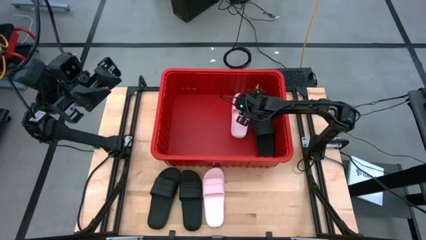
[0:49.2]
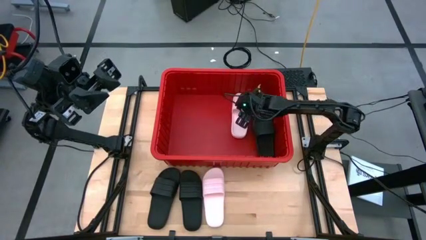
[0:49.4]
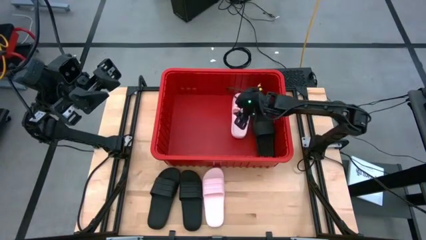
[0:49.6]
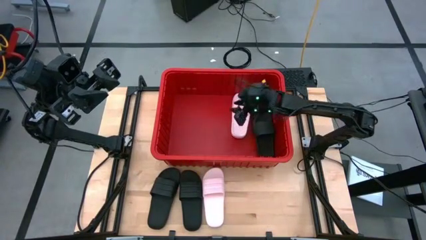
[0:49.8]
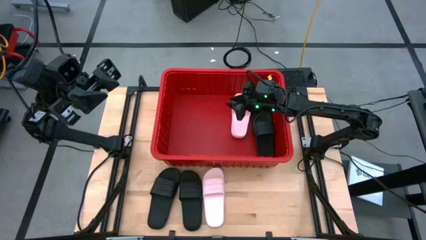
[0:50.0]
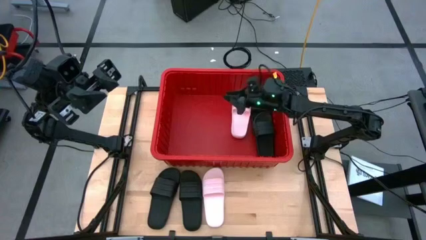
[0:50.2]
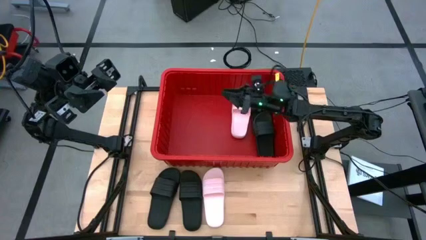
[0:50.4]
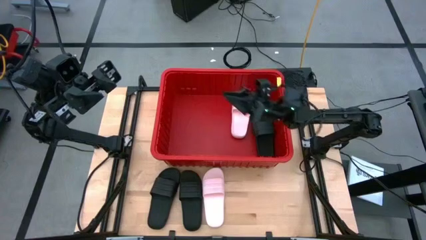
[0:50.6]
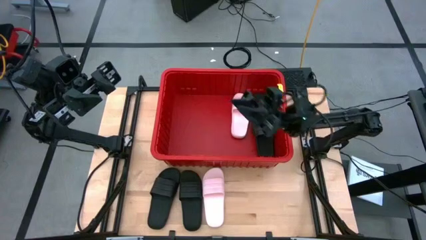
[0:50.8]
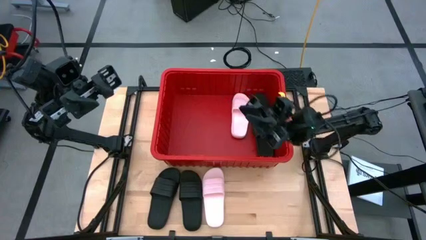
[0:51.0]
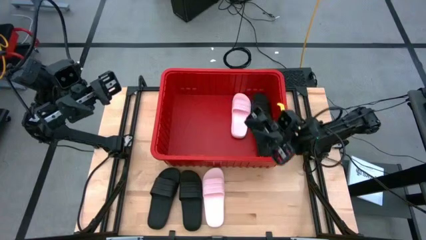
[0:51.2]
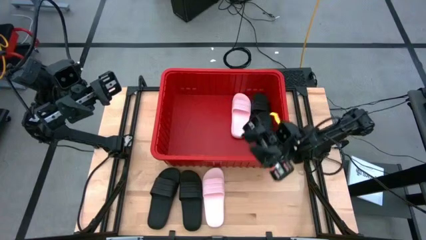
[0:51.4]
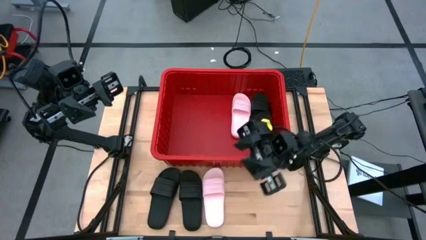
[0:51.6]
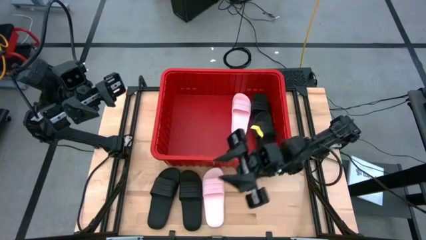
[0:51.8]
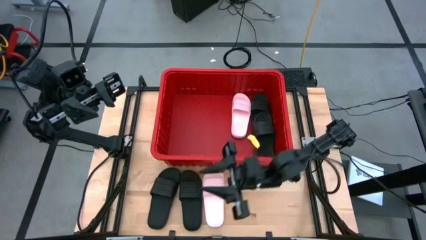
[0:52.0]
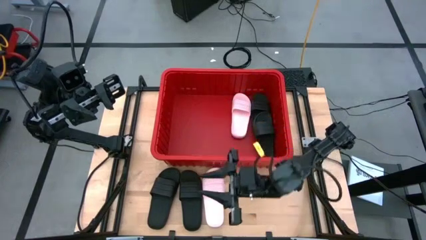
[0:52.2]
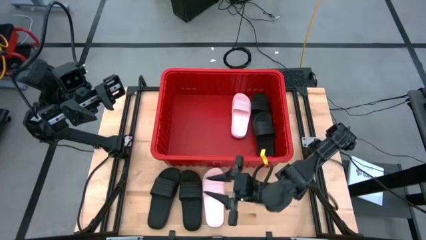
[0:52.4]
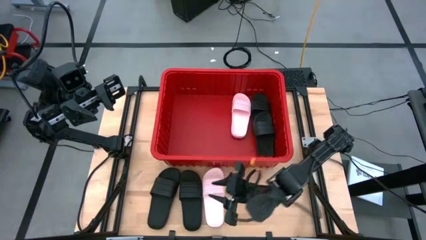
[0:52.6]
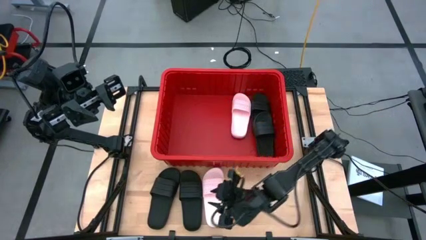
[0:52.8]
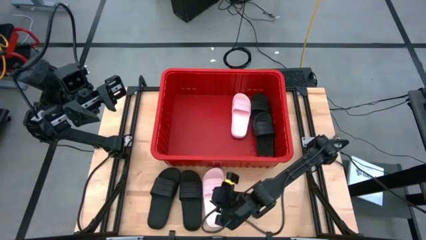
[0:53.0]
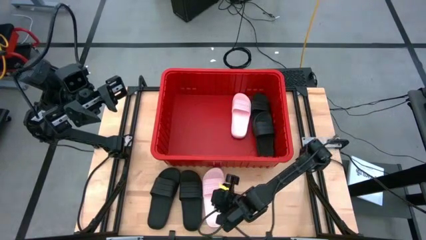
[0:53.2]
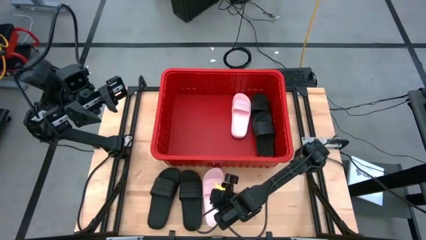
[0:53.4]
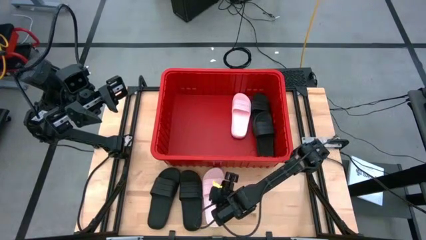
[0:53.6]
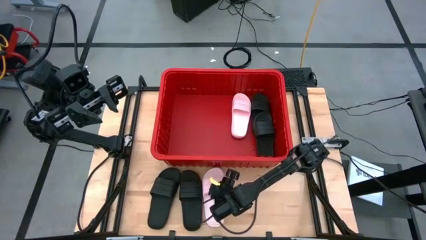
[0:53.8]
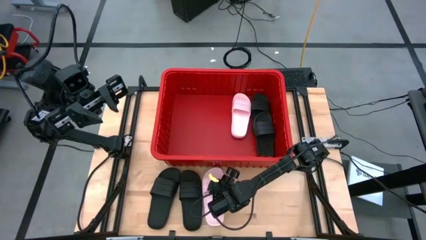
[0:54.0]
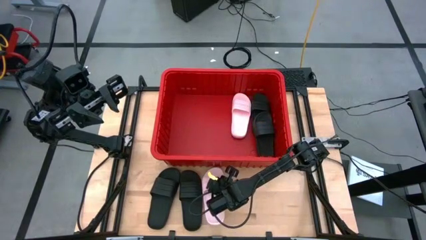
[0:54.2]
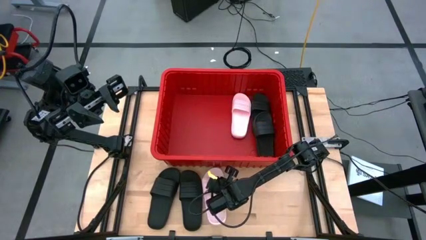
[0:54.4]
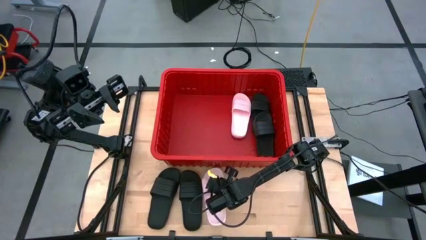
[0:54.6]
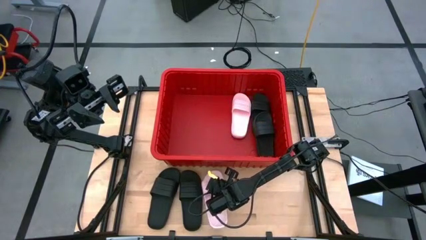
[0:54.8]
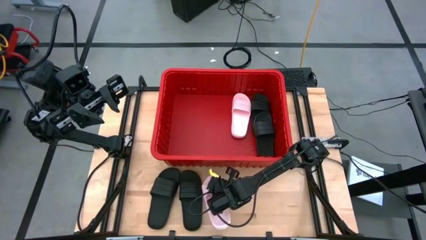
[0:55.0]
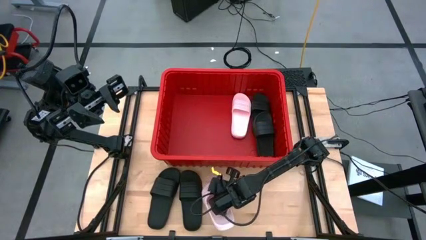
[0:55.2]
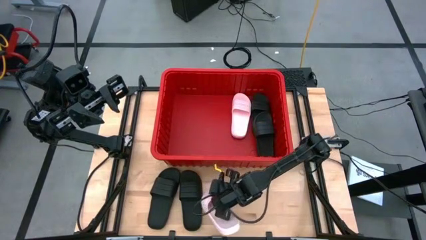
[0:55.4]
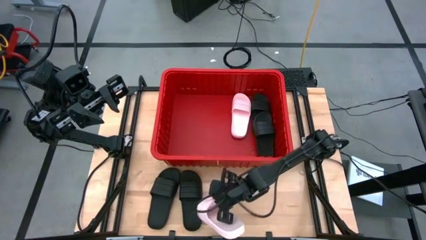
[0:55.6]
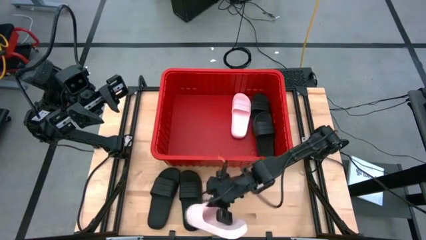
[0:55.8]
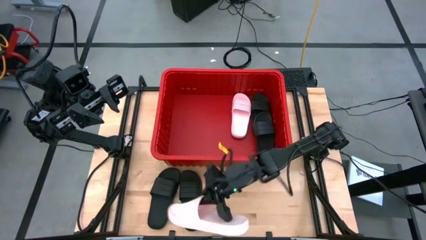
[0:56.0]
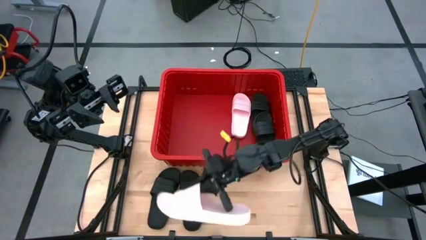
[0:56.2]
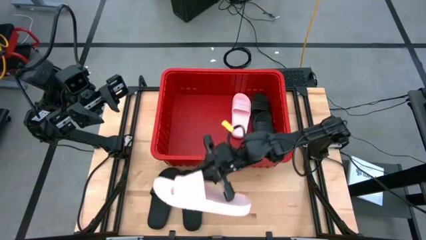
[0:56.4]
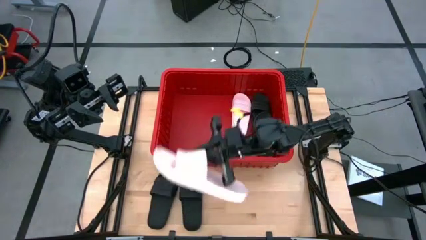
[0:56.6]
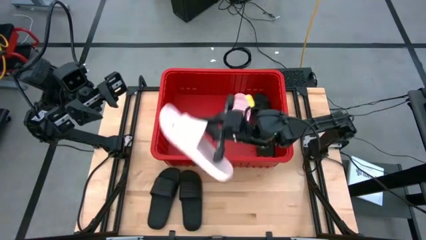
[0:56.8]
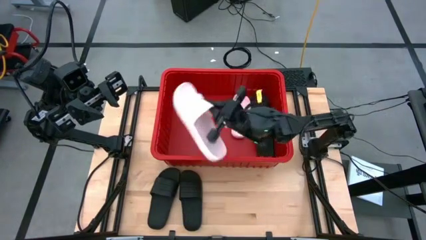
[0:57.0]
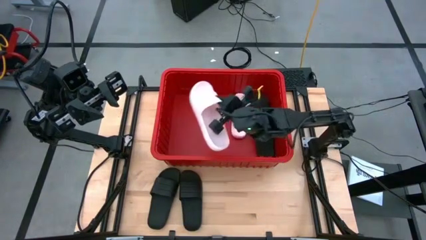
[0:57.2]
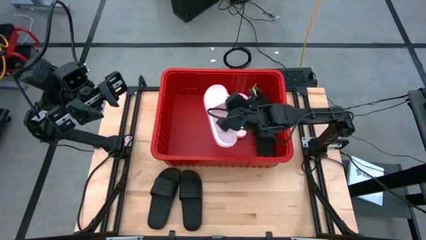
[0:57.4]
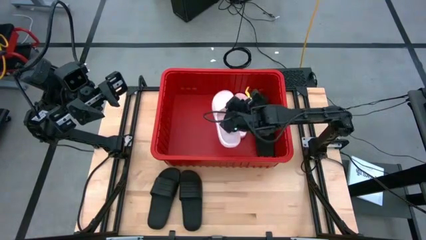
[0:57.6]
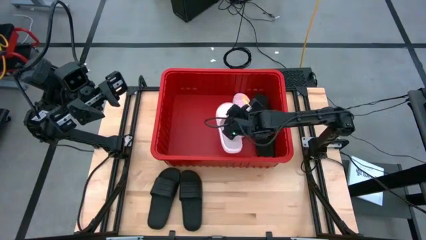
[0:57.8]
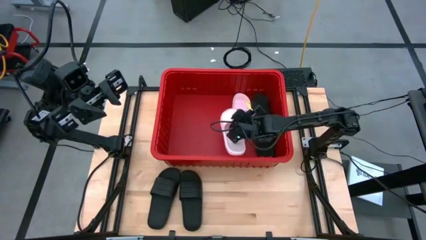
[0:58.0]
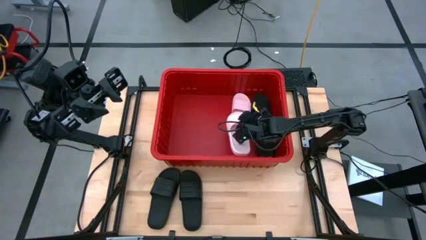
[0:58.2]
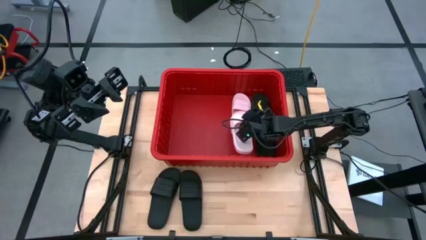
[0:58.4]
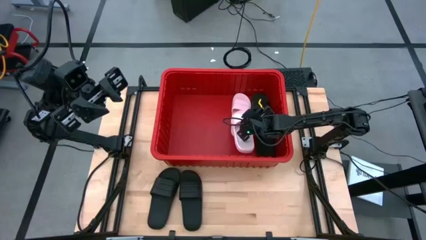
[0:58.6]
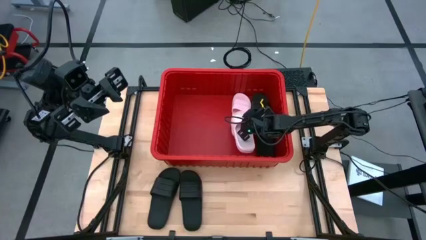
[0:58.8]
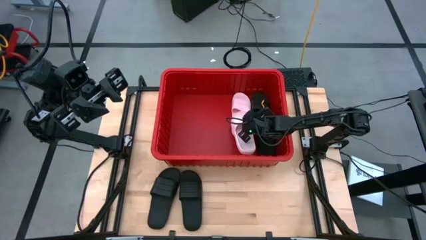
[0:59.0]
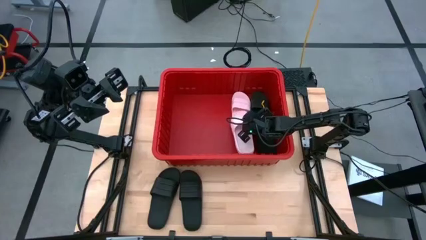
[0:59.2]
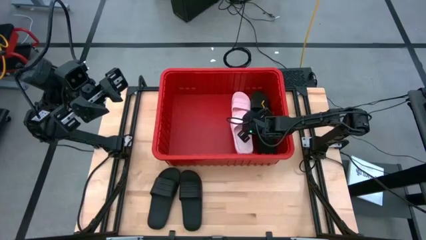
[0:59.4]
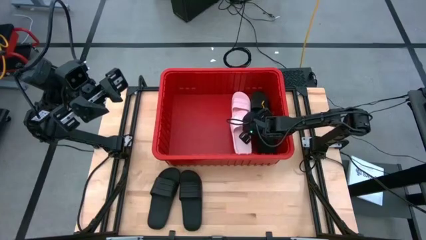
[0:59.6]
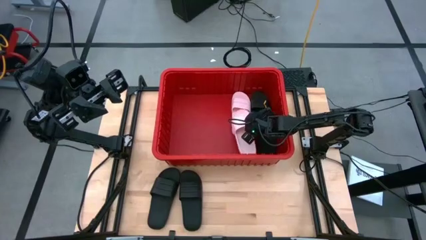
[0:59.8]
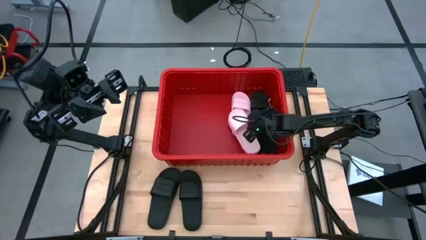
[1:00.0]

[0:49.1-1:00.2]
Task: Pick and place slides into bin
Put the pink slide into the red bin

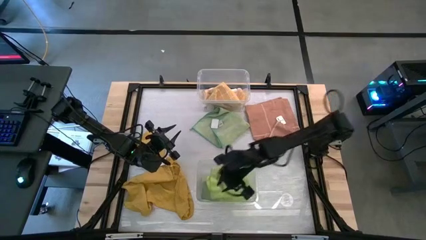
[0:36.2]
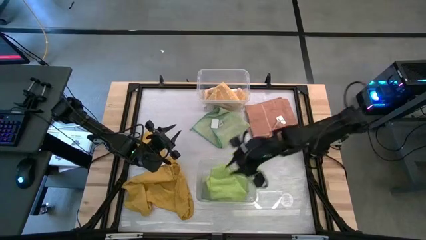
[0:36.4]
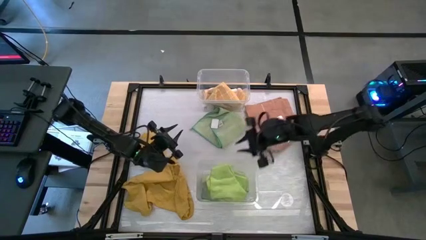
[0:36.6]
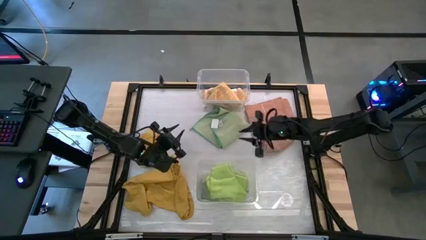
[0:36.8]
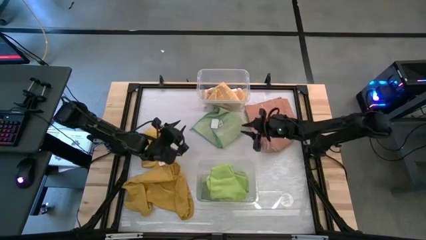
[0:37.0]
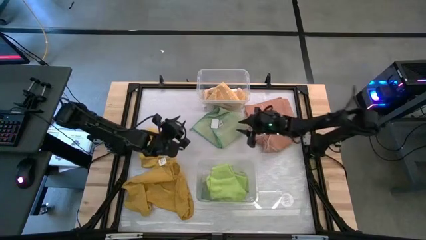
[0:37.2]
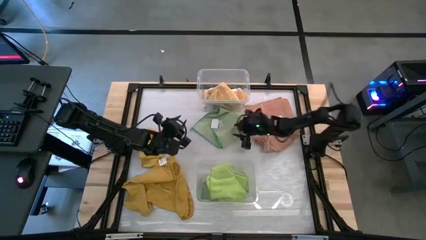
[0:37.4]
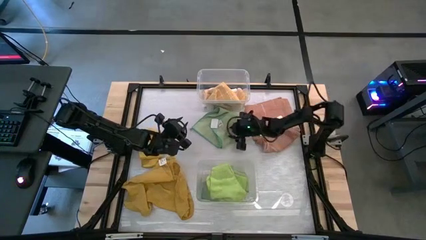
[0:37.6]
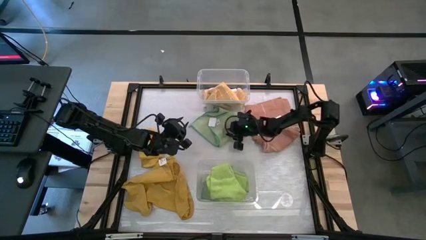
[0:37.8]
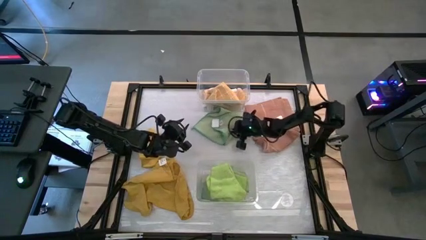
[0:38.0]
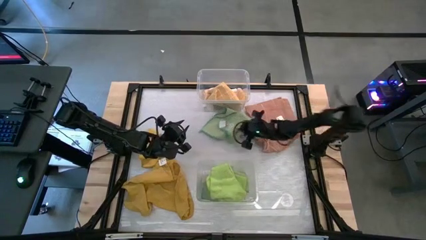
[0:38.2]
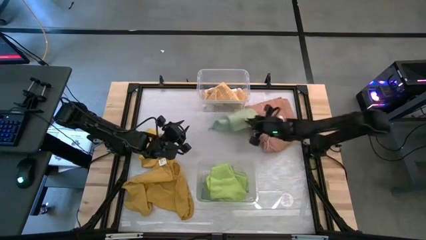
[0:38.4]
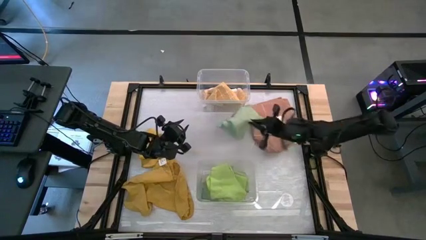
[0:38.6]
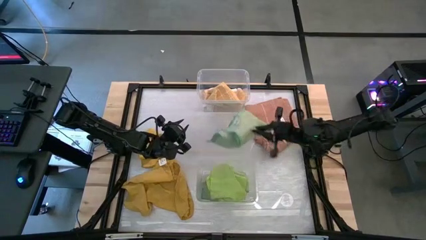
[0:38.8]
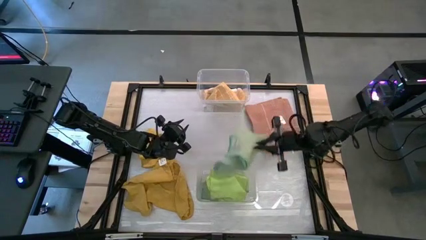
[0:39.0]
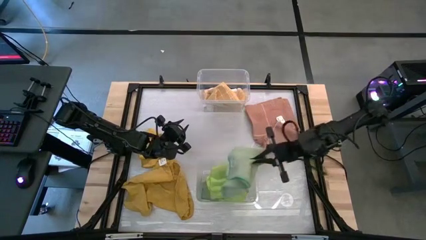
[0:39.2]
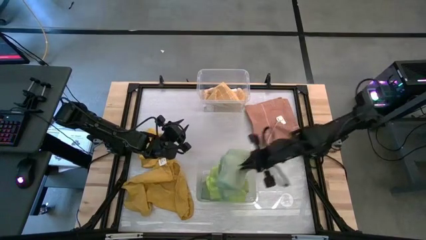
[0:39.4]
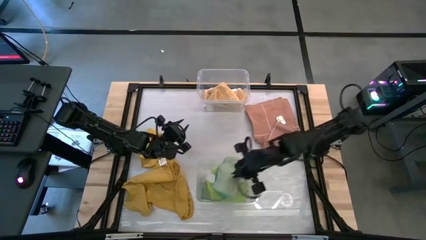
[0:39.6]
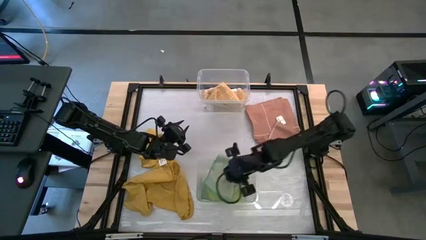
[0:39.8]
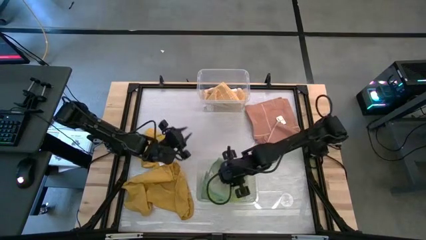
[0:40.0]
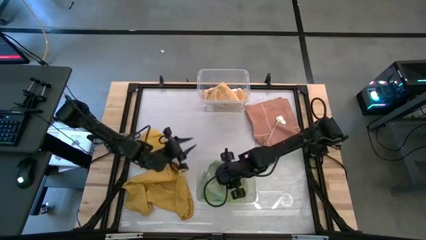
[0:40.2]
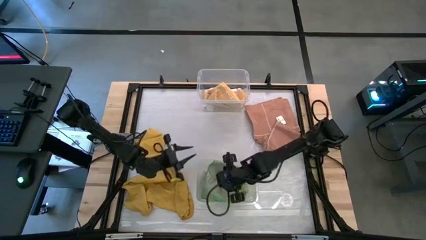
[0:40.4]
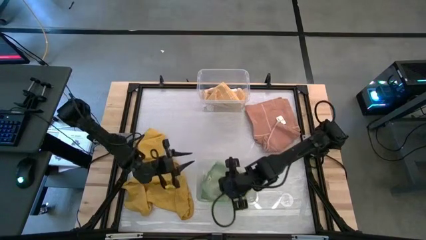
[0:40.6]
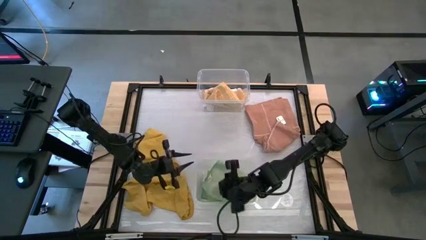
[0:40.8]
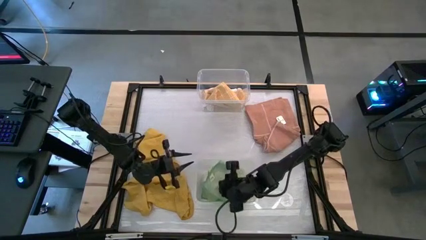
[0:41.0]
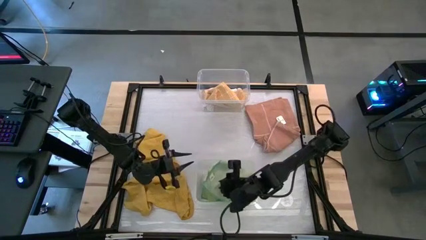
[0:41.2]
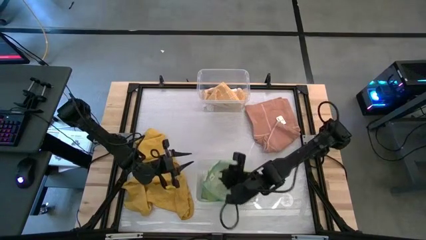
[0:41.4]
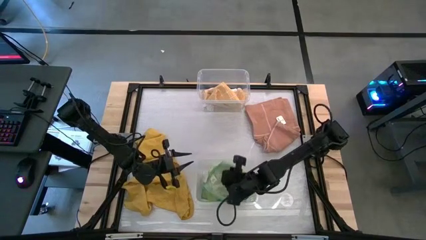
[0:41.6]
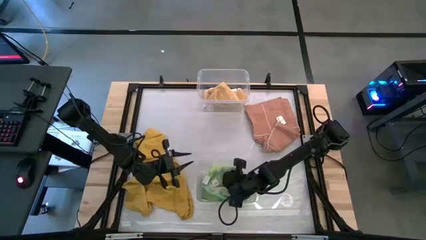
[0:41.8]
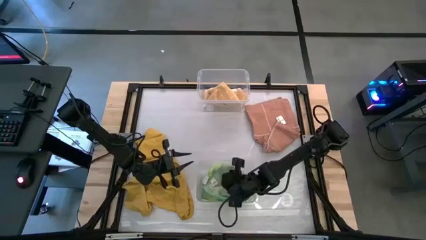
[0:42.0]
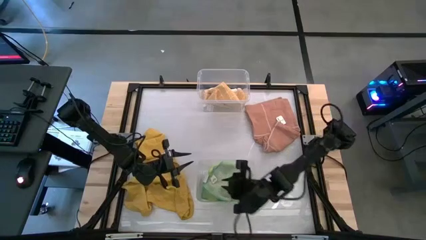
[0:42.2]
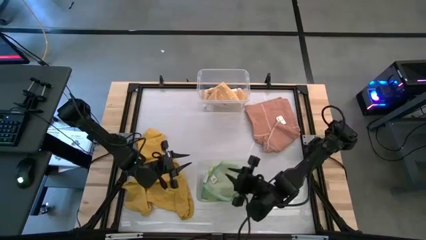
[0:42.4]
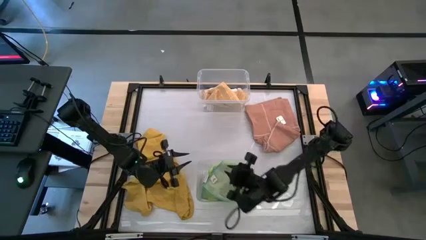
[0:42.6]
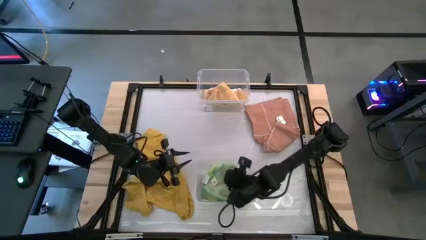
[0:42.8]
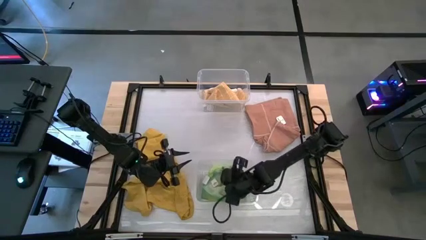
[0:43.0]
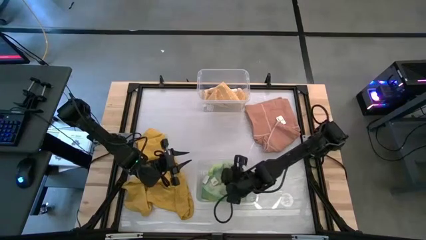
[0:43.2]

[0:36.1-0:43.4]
Task: Sort towels by color in basket
Put the green towel into the bottom transparent bin
